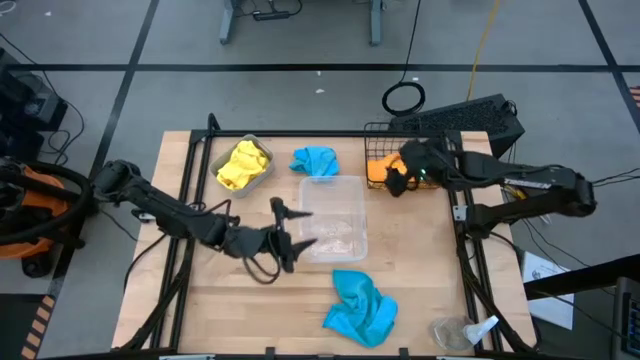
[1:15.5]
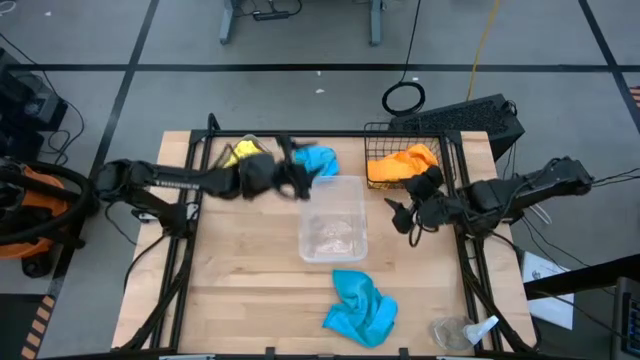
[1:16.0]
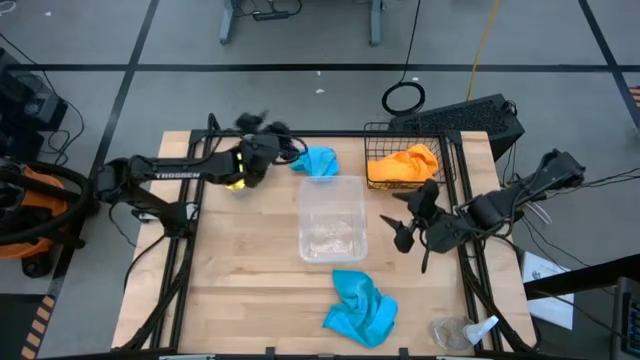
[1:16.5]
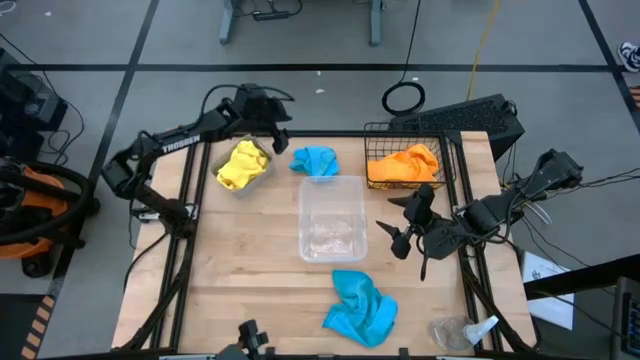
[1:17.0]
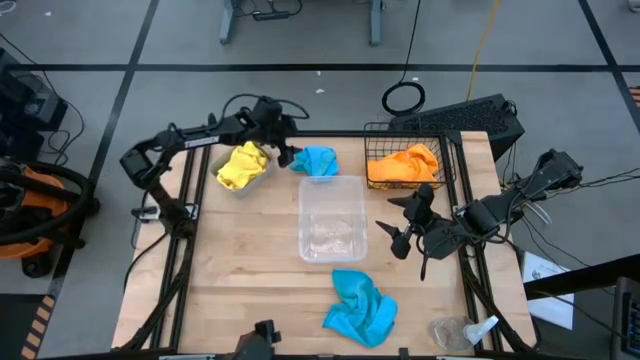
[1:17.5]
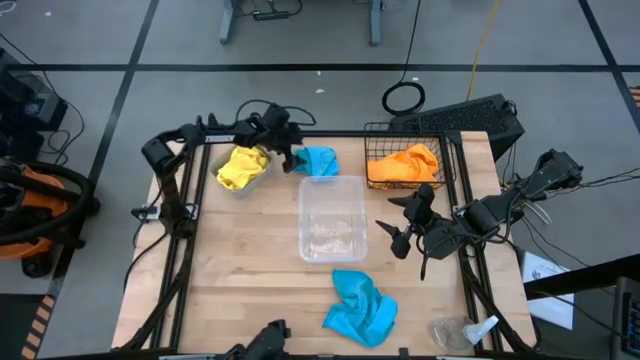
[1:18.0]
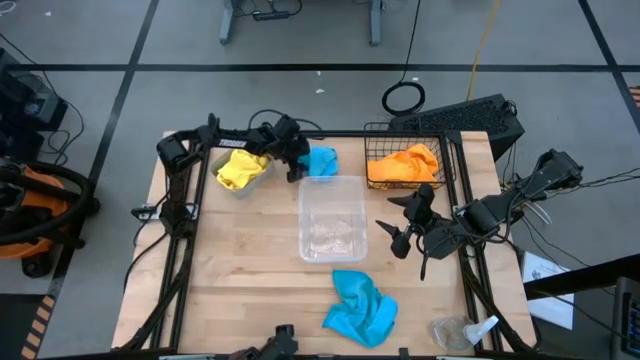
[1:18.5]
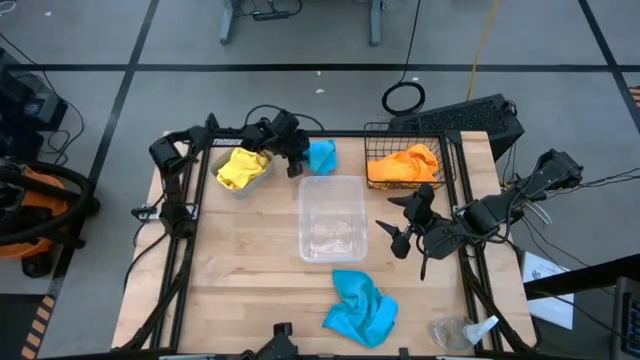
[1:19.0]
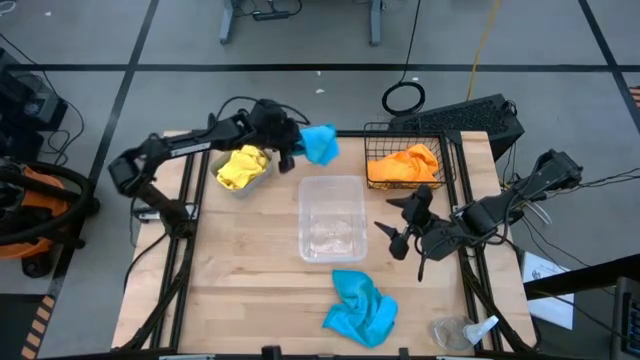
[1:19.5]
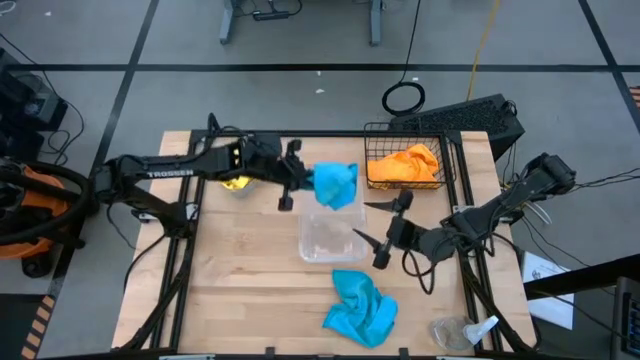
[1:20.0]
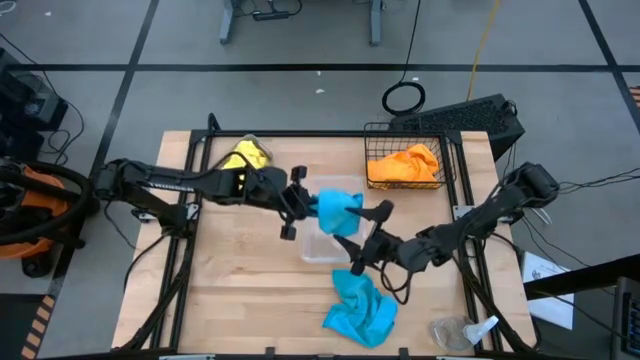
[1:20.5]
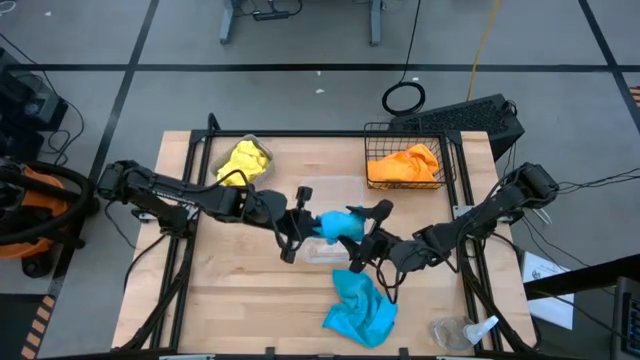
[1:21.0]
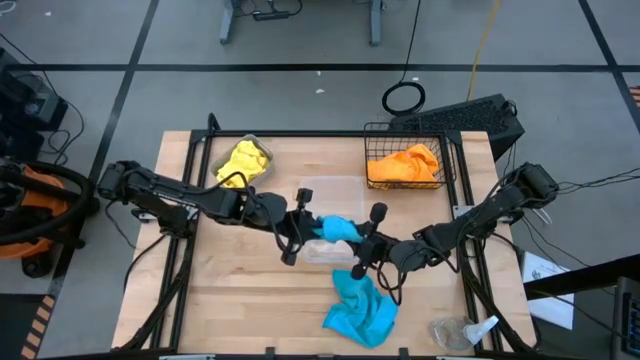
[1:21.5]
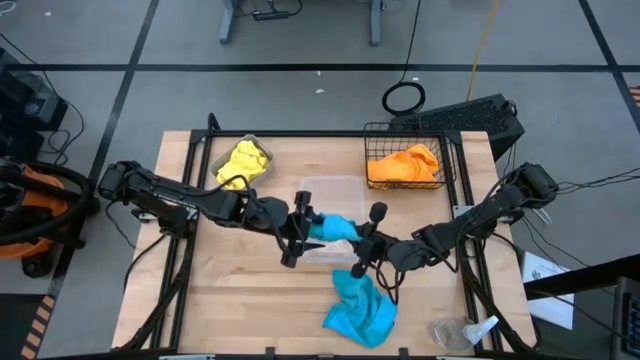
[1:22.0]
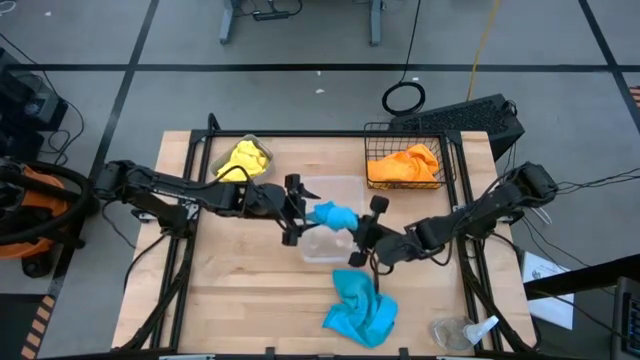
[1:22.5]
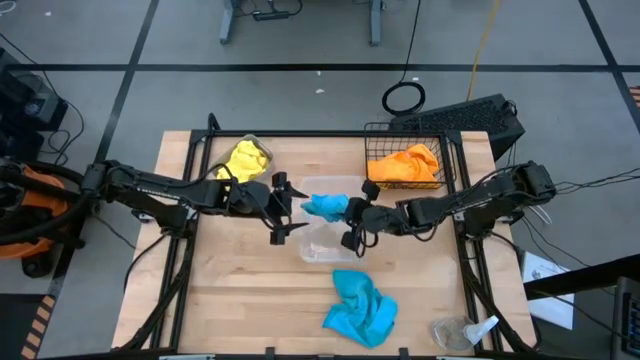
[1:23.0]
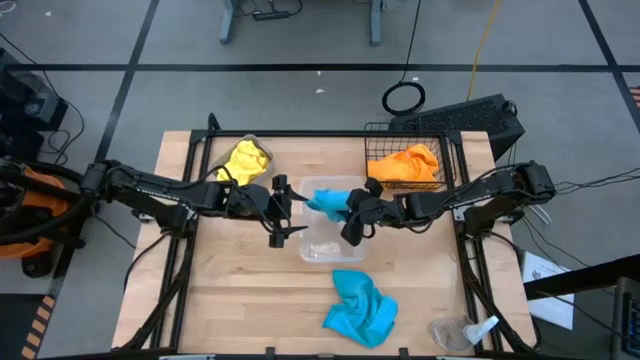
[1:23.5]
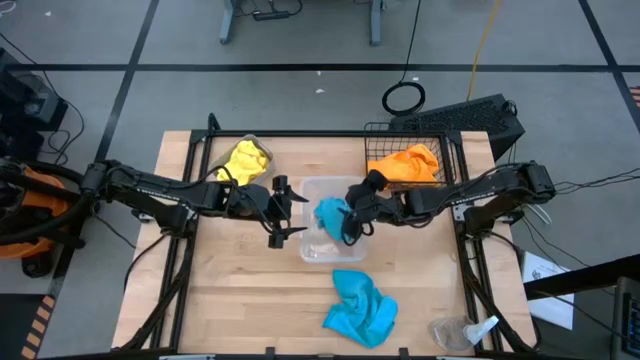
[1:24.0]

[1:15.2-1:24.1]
Task: Sort microfiber towel by color & place in baskets
Put the top blue towel into the transparent bin

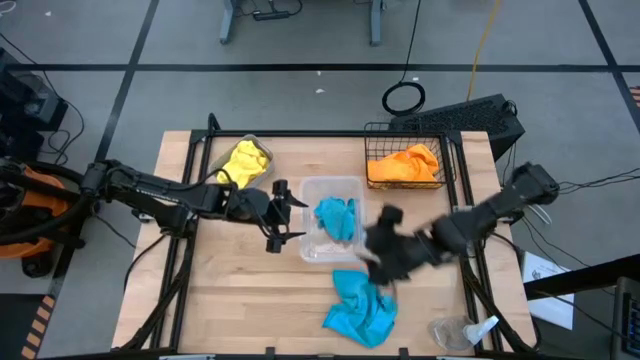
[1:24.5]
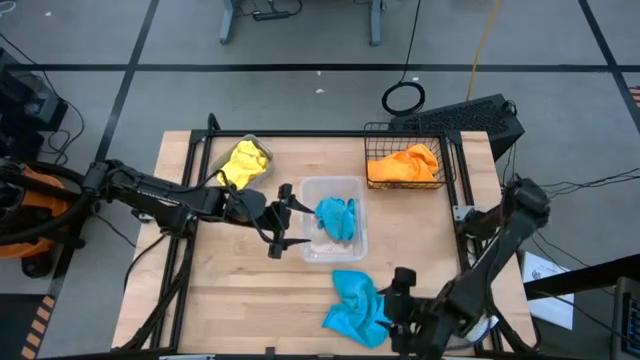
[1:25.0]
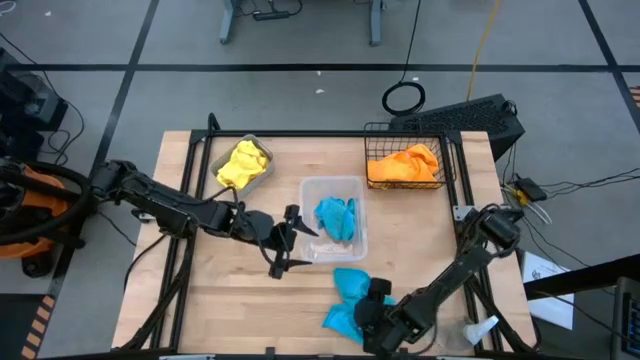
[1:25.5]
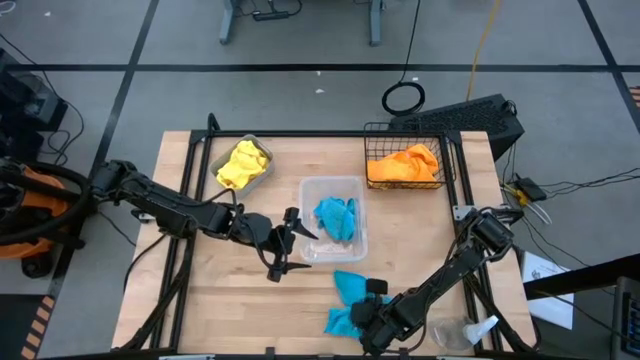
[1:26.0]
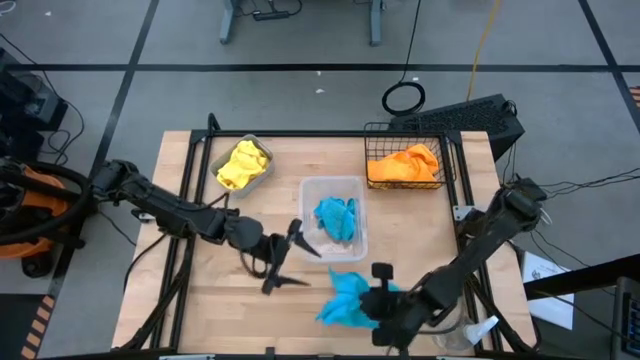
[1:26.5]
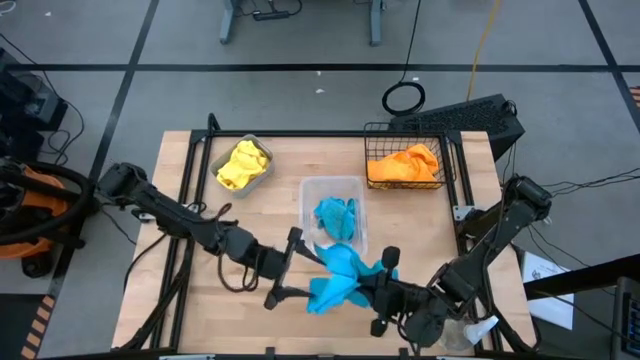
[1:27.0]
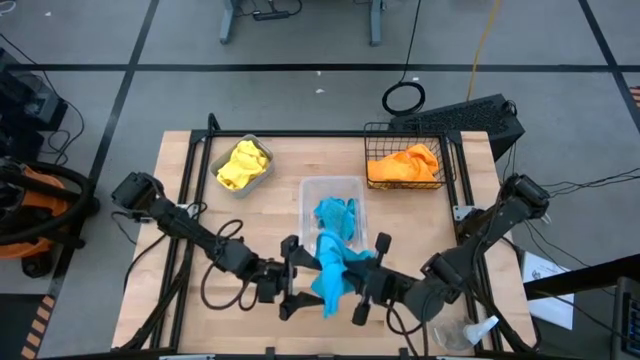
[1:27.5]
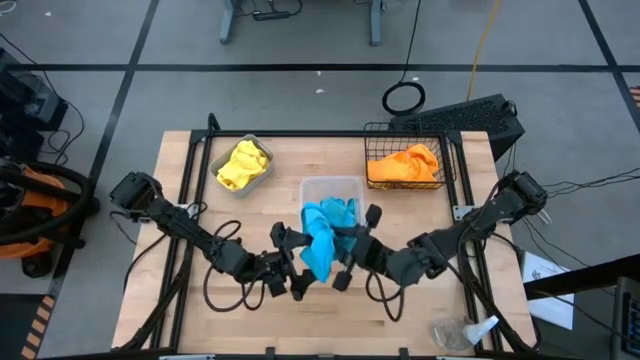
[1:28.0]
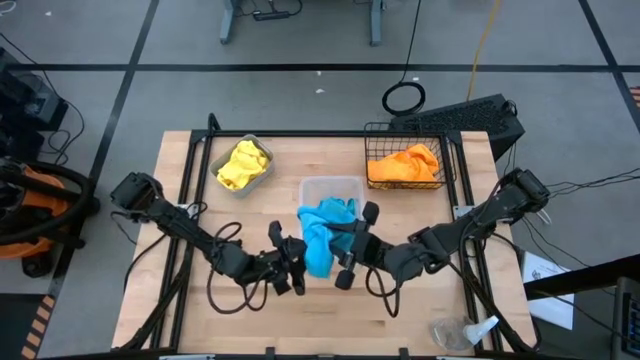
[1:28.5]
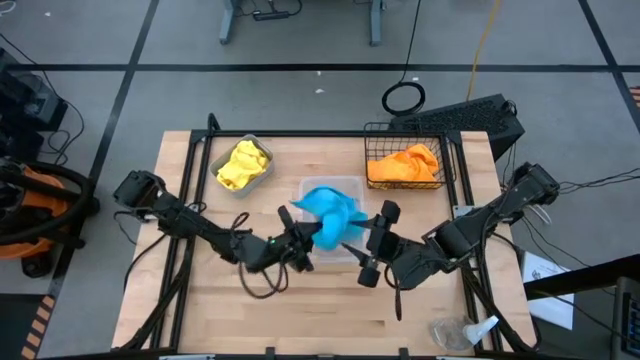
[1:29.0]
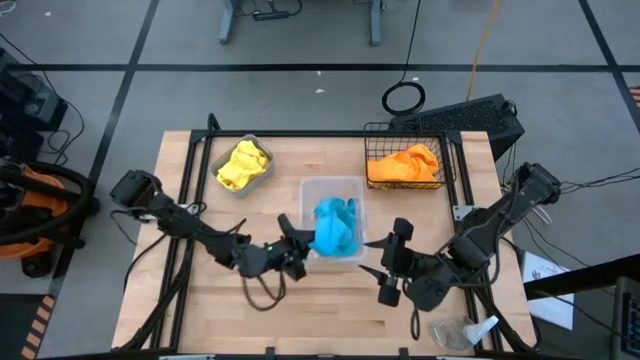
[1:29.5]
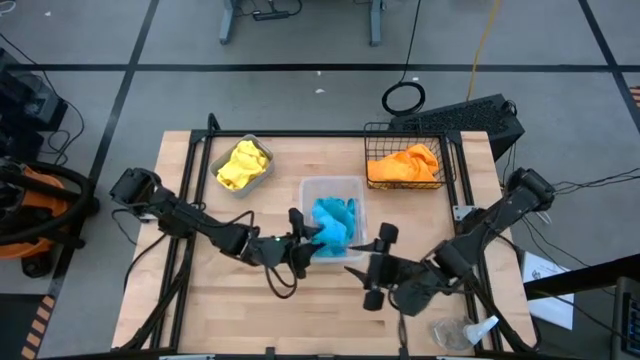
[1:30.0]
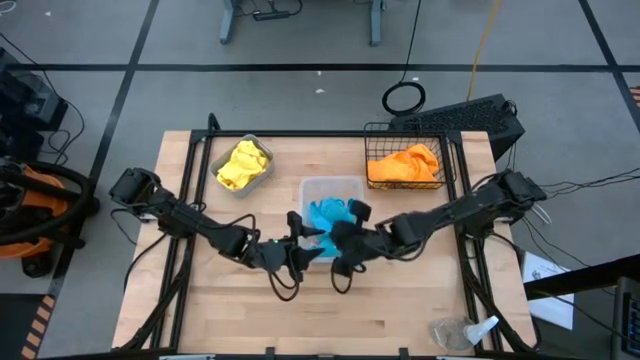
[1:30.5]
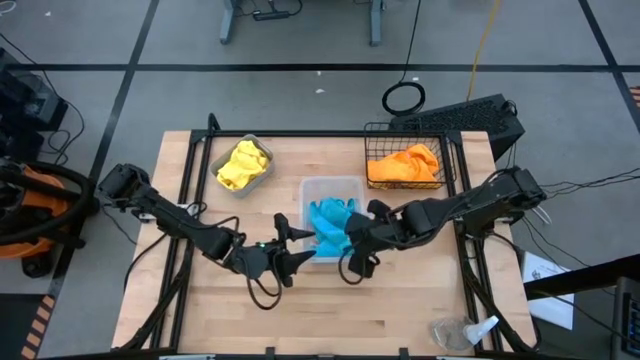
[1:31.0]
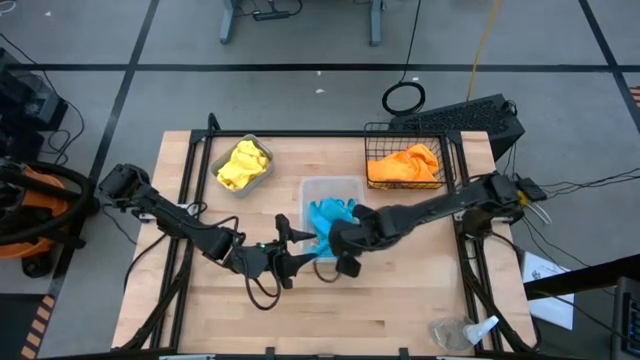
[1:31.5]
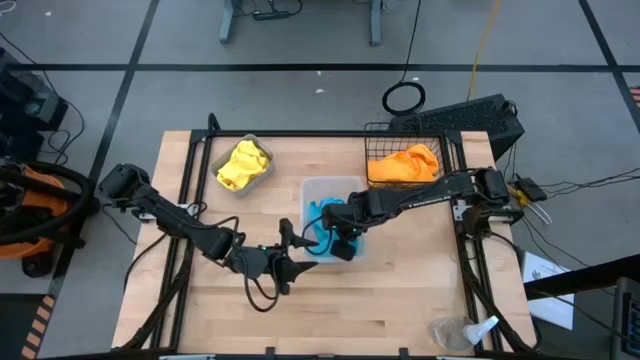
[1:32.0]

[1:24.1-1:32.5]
Put the blue towel into the transparent bin

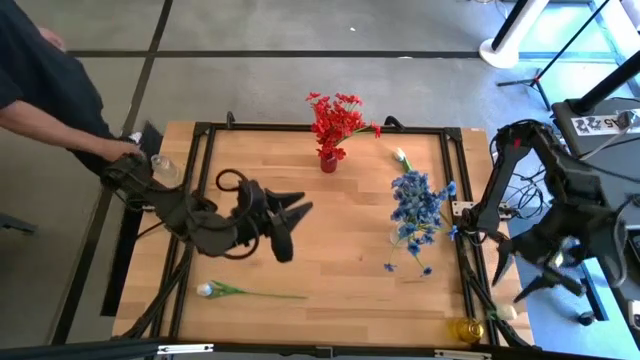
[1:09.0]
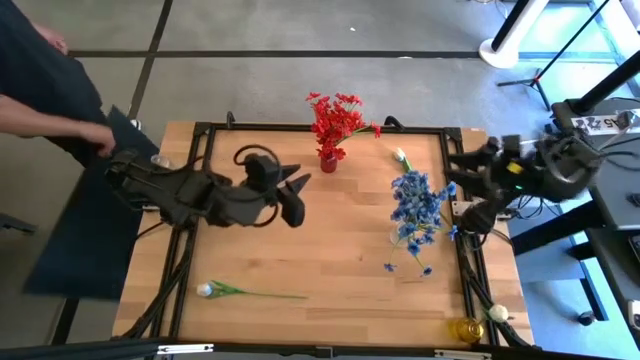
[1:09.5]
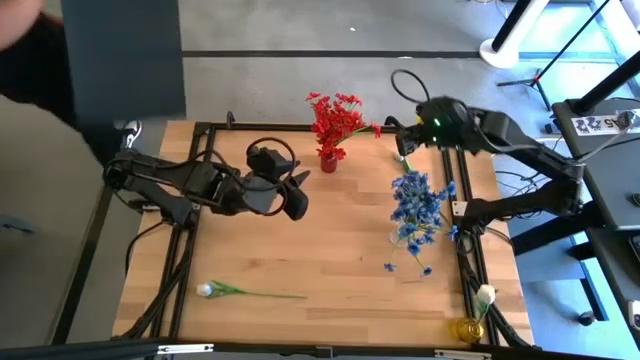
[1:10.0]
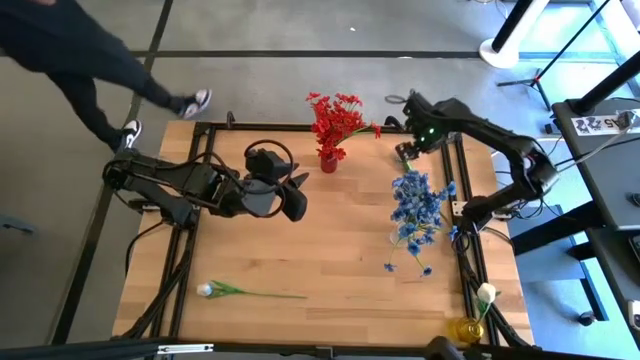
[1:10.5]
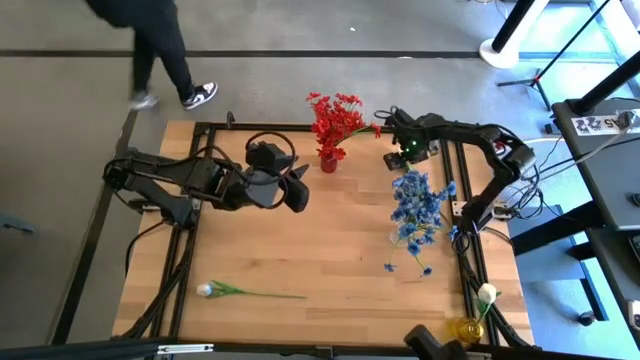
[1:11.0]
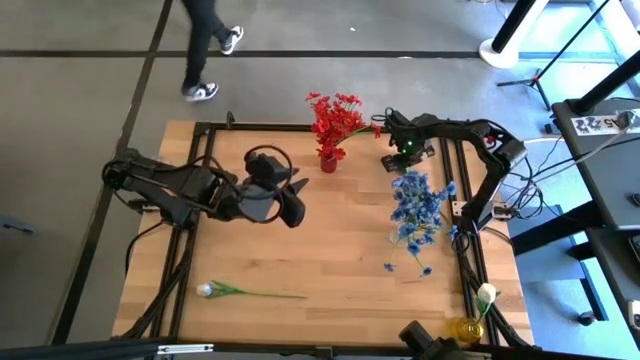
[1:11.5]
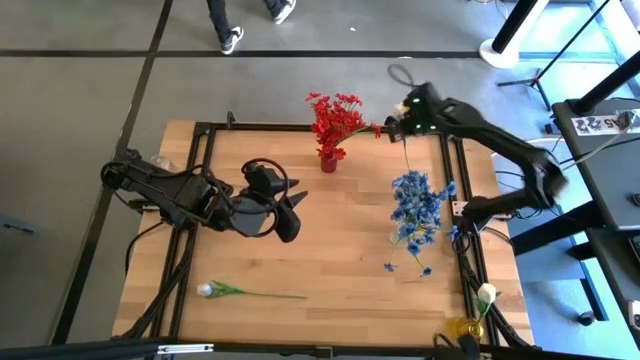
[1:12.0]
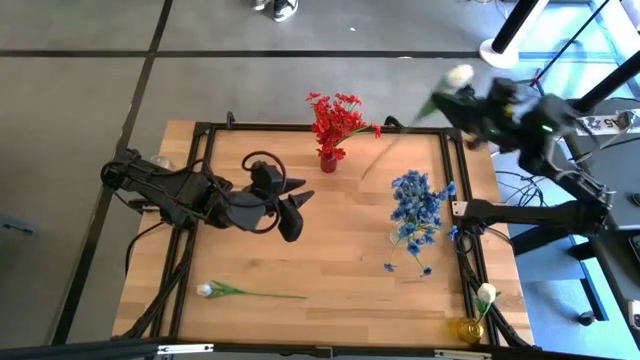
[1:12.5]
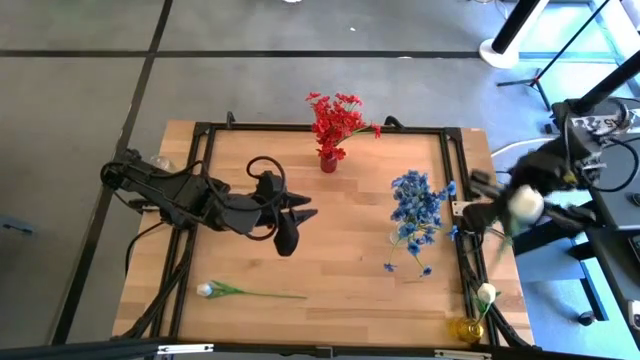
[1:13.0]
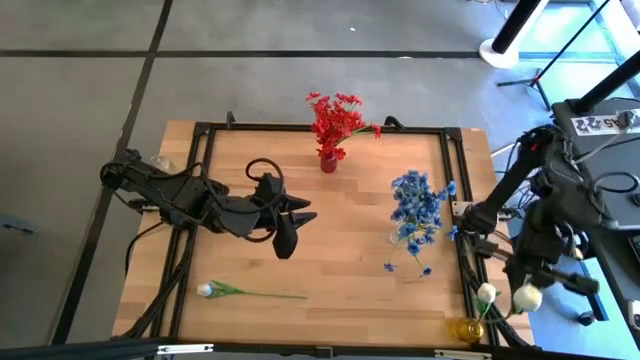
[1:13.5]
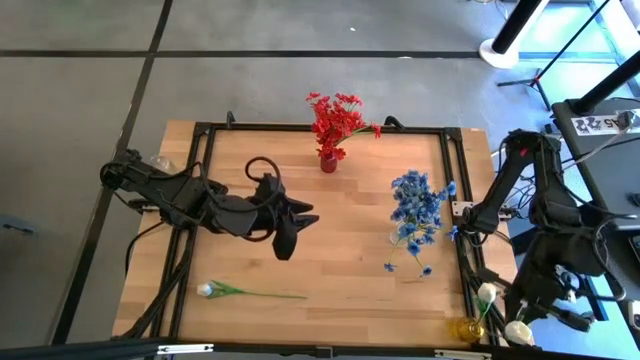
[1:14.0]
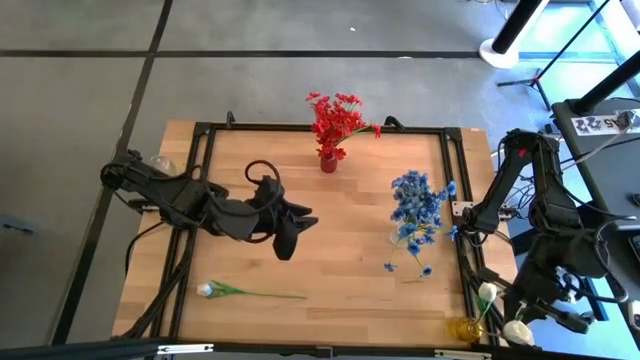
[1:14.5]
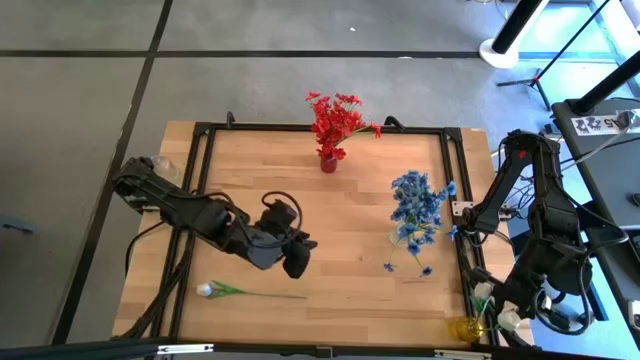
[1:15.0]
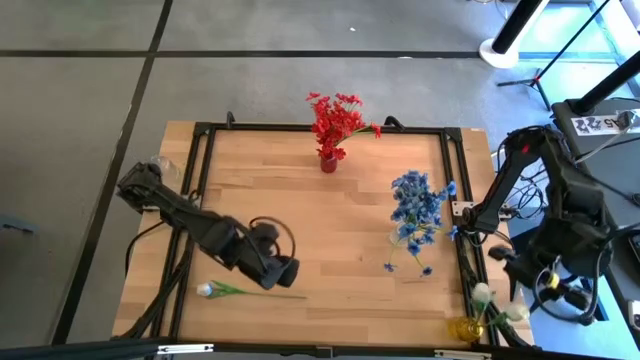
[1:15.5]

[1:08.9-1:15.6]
Task: Sort flowers into vase by color
Put the top white flower into the yellow vase
